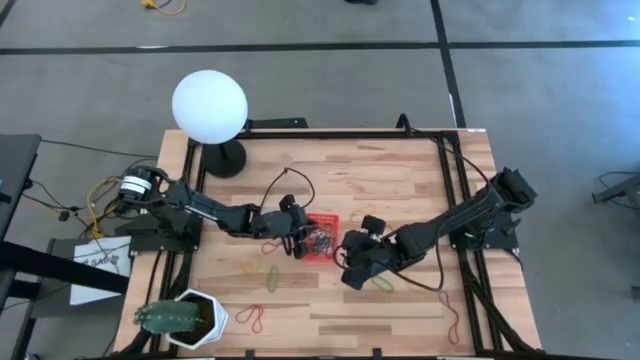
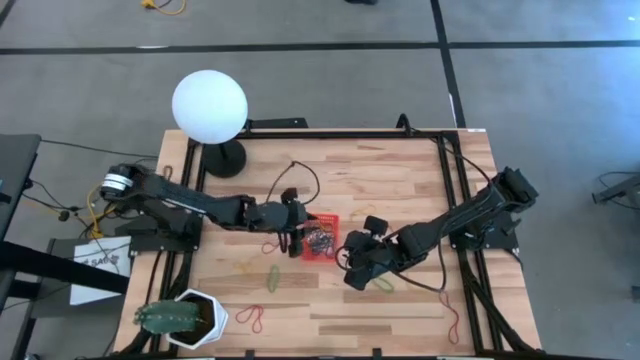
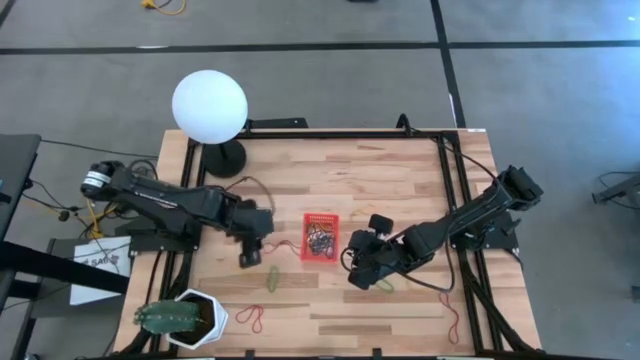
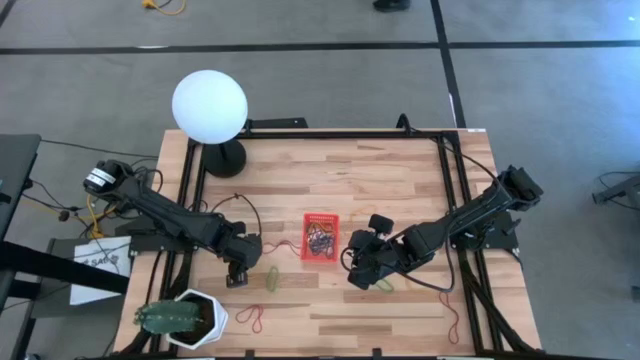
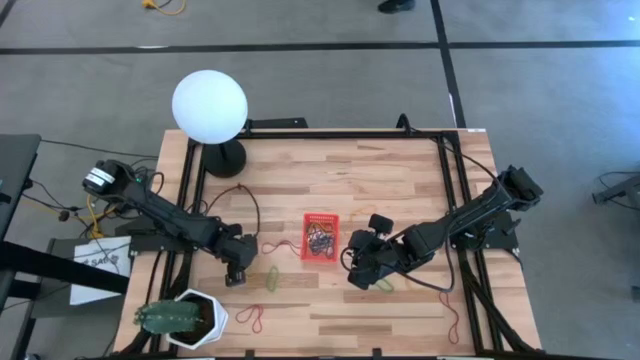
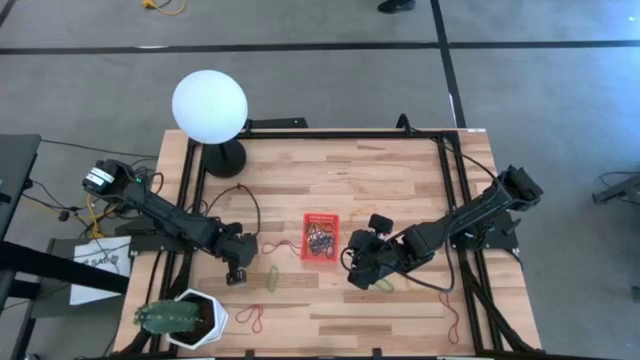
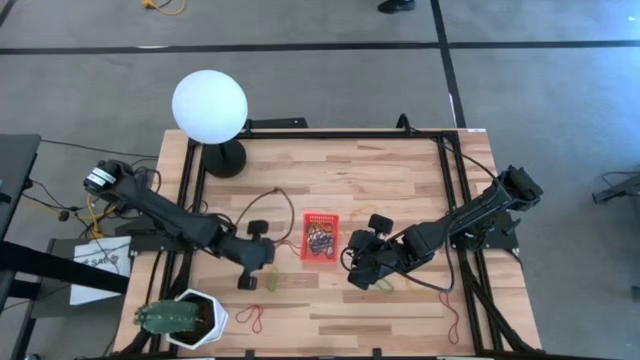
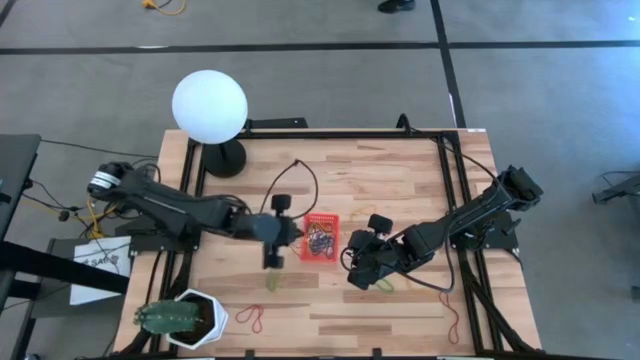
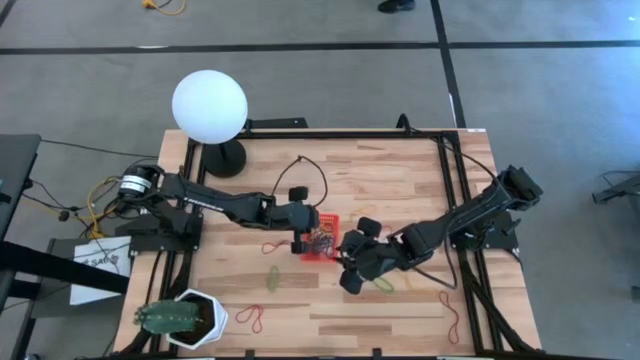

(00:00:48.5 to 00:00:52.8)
Task: Pick and place items into bin
Put the yellow rubber band into the orange bin

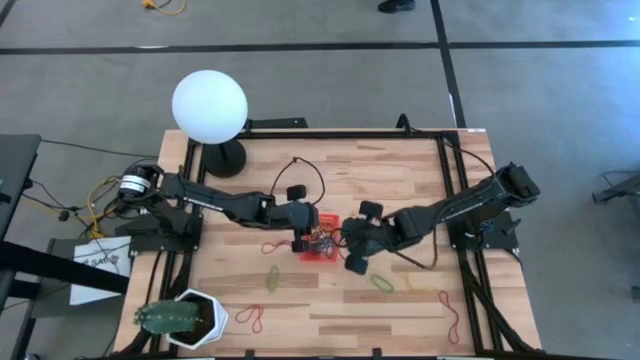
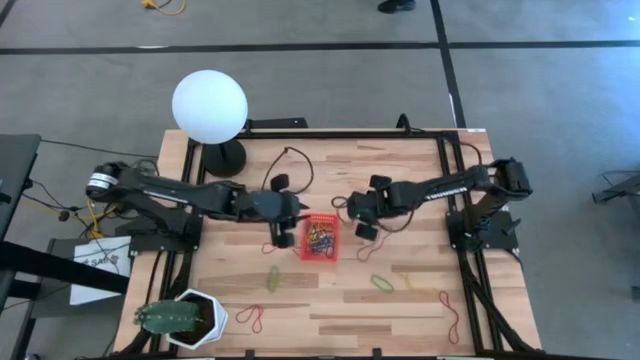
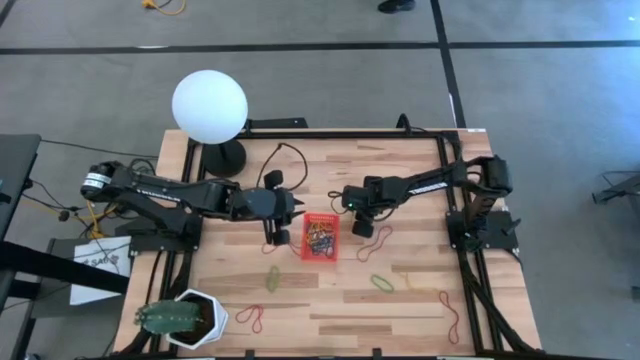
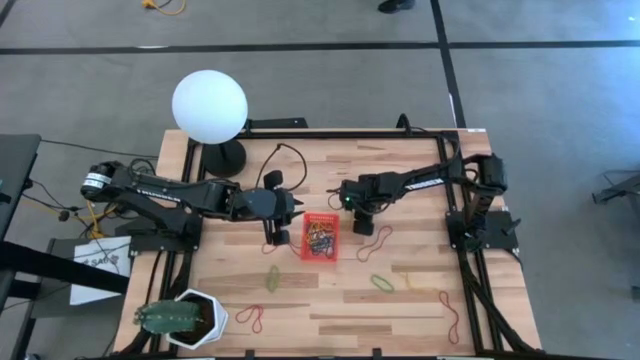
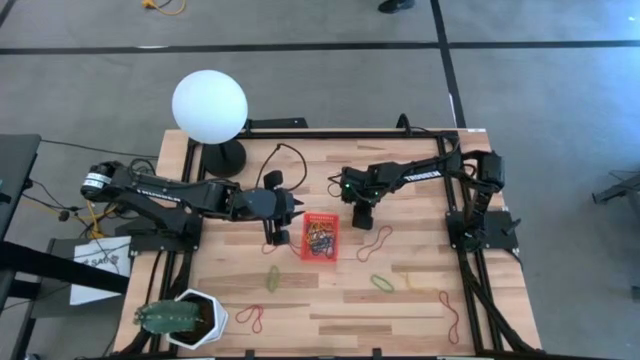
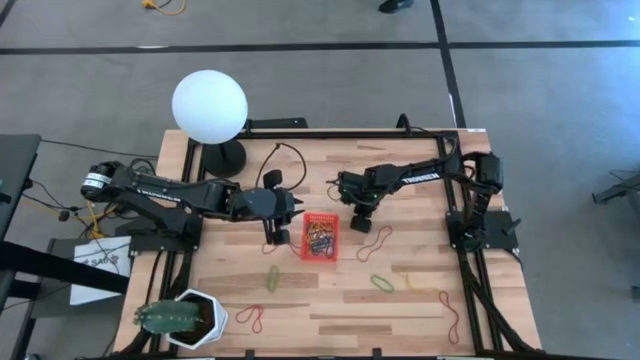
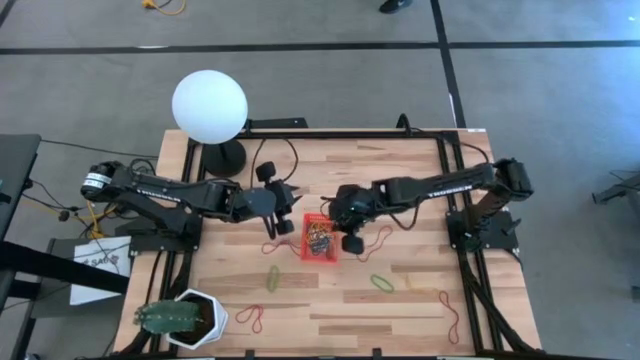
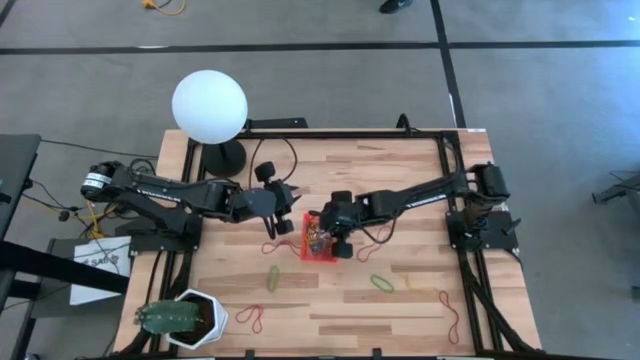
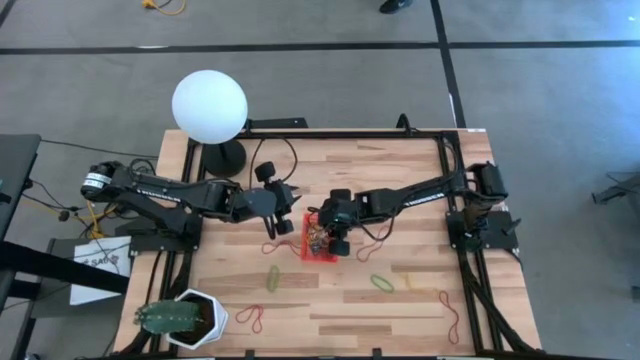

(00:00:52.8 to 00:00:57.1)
Put the yellow rubber band into the orange bin

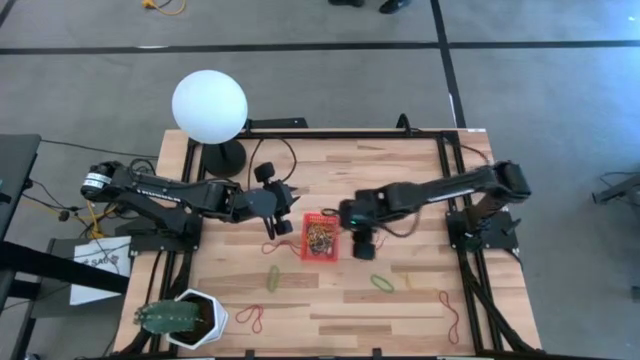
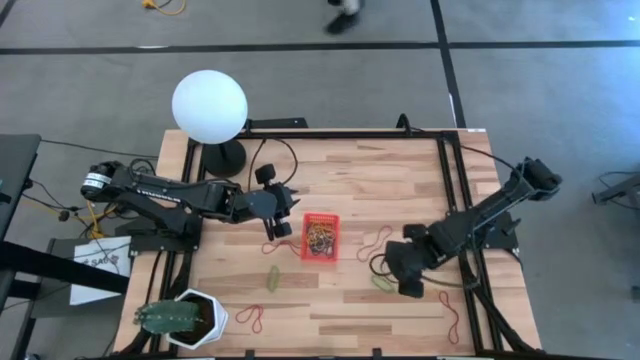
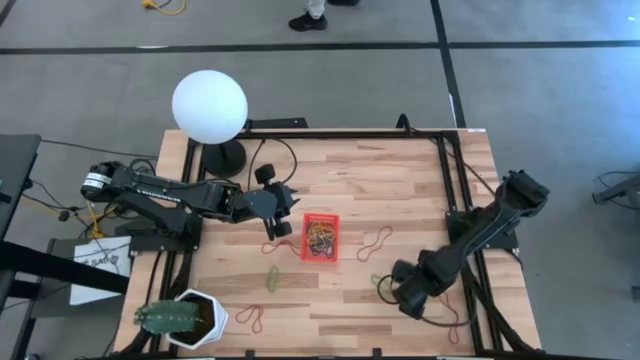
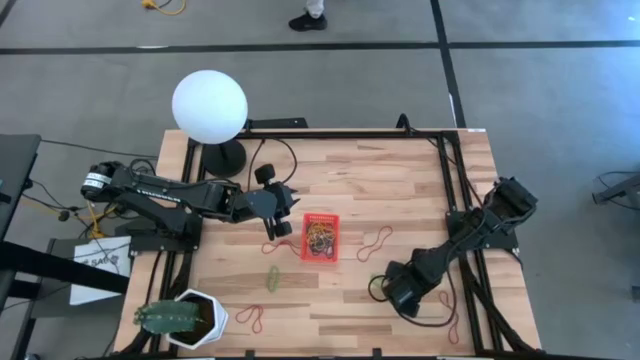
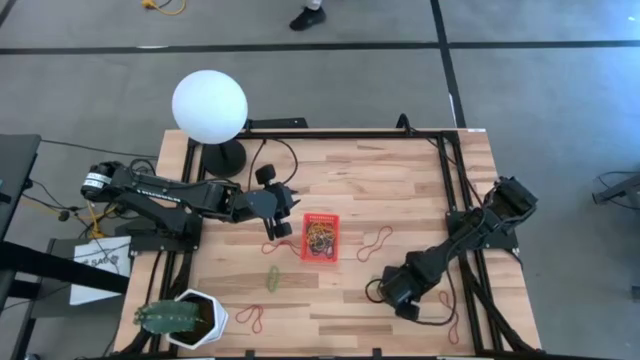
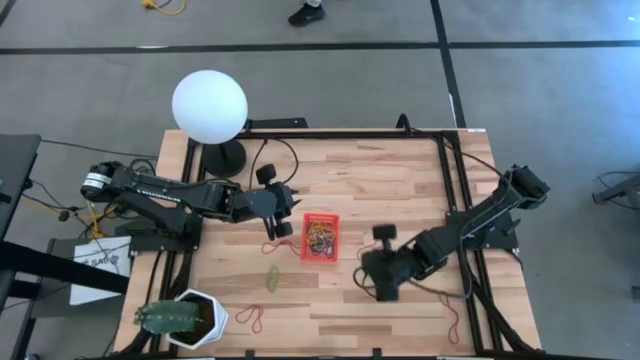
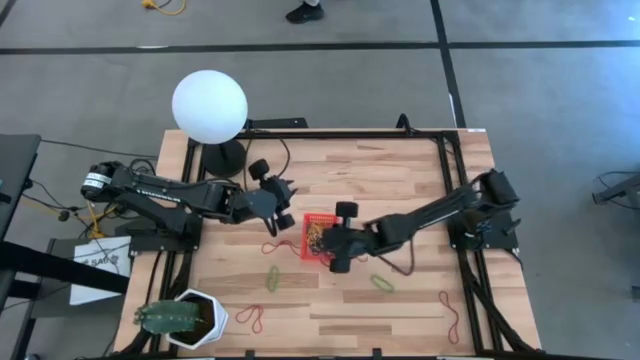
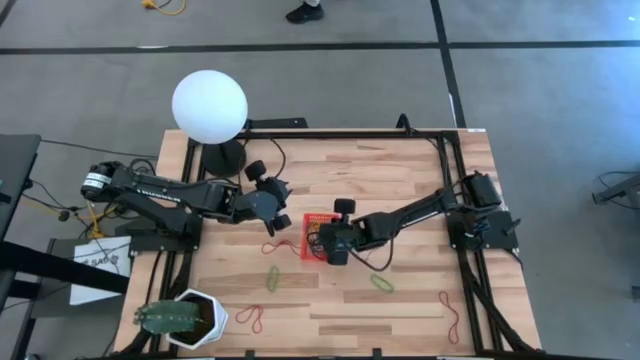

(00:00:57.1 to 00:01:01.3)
Put the yellow rubber band into the orange bin

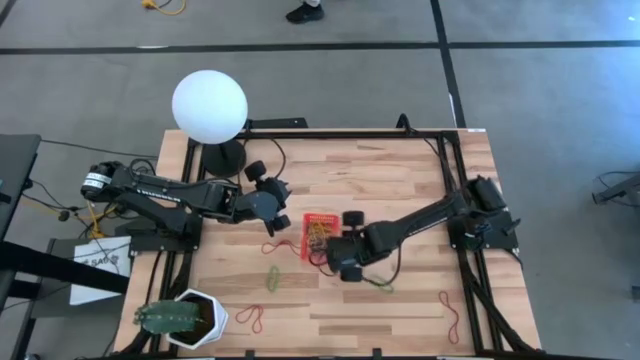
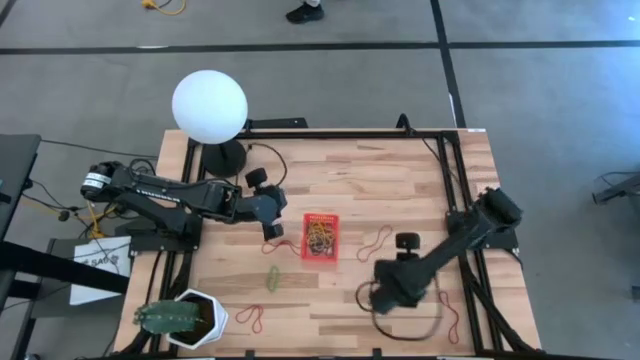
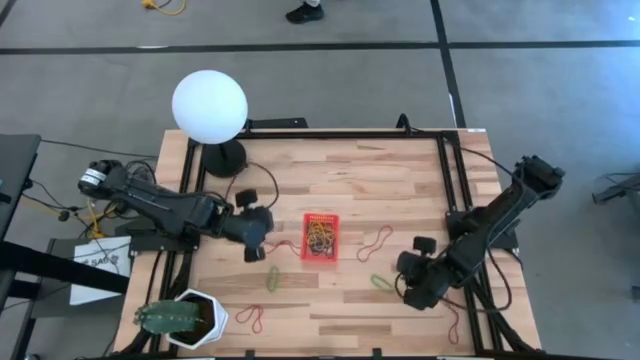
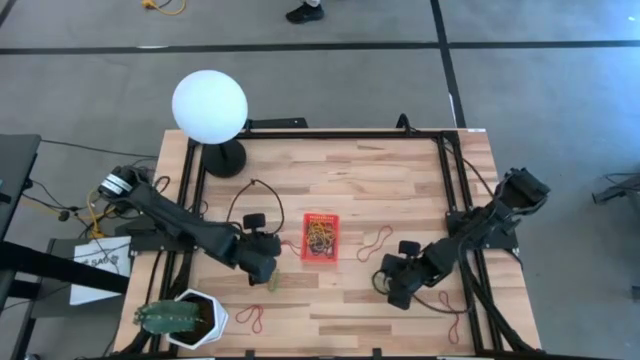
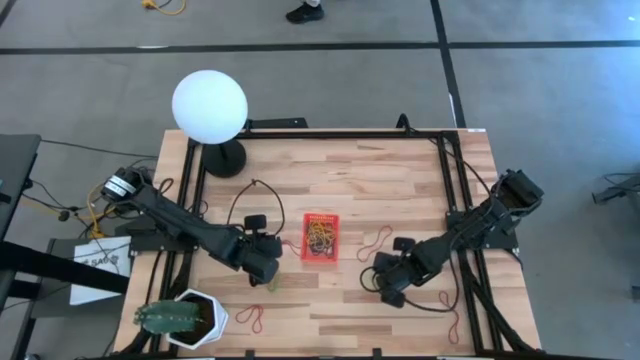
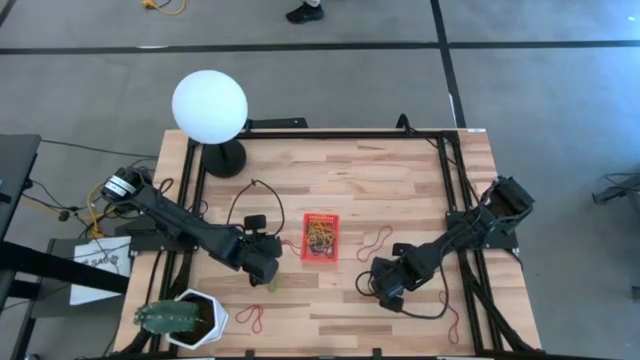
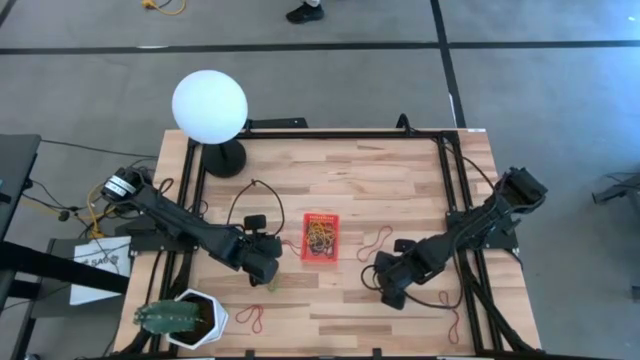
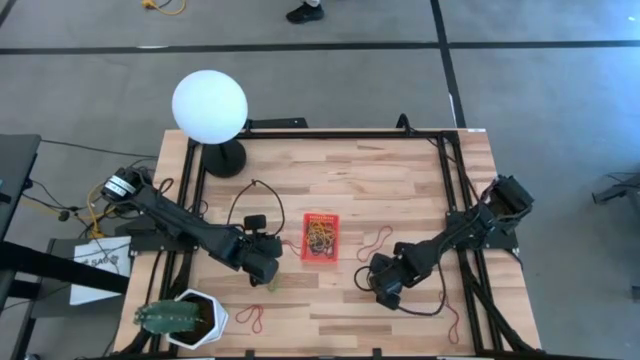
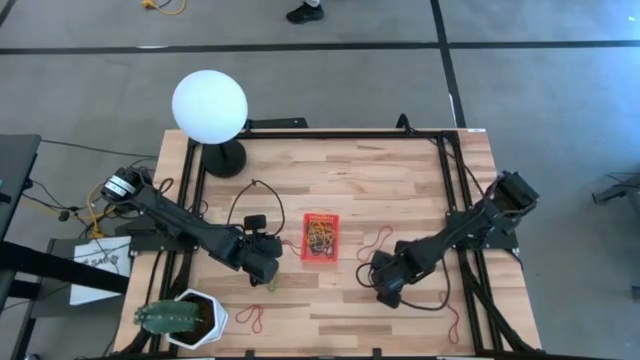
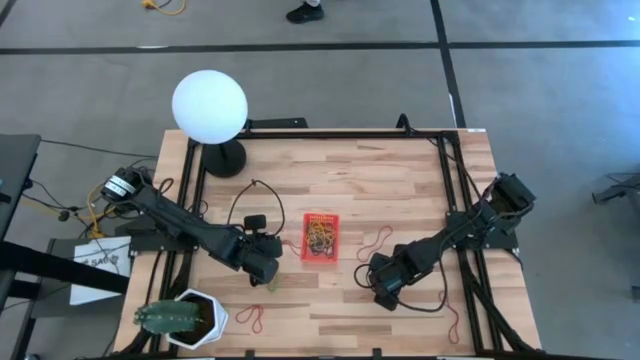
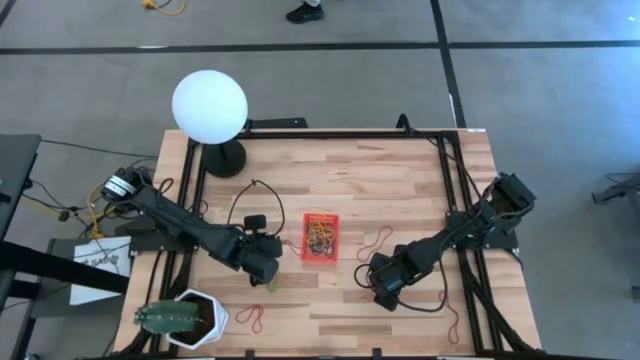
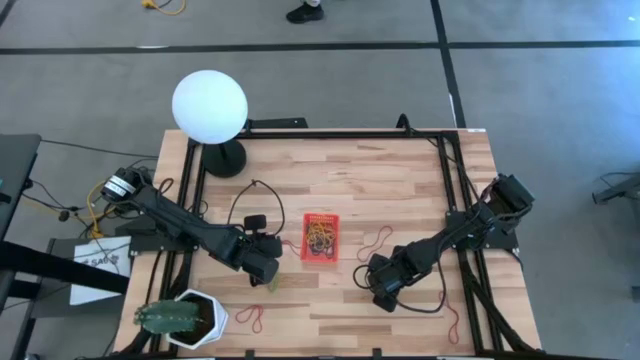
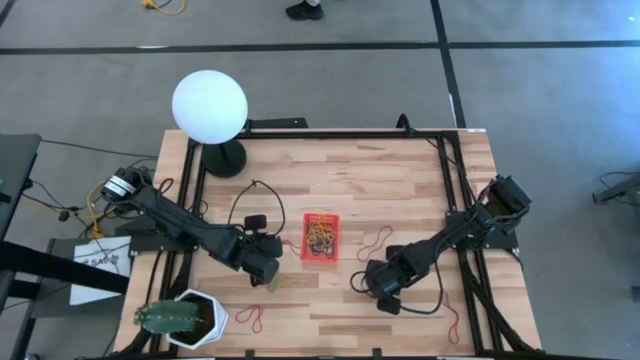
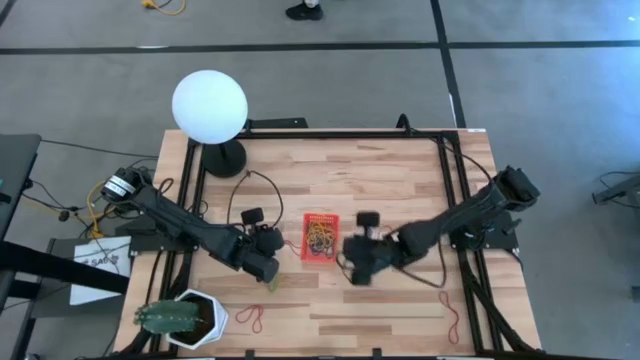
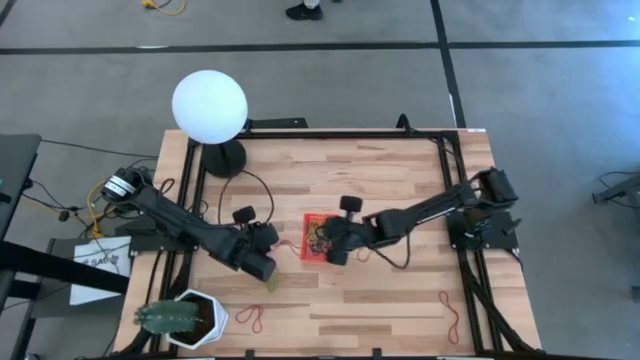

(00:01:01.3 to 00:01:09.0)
Put the right green rubber band into the orange bin

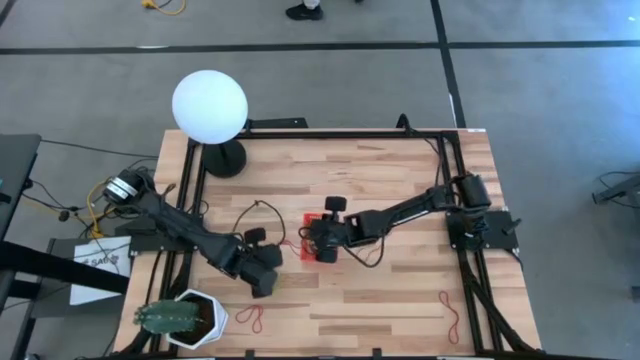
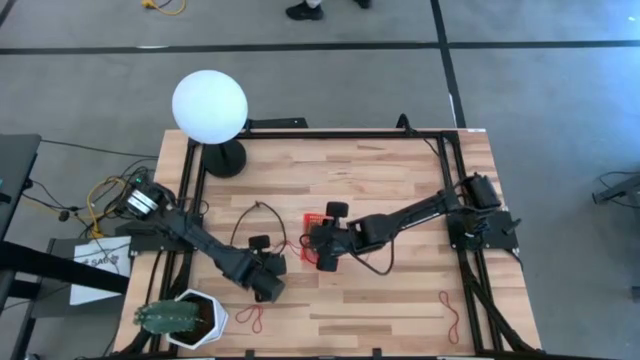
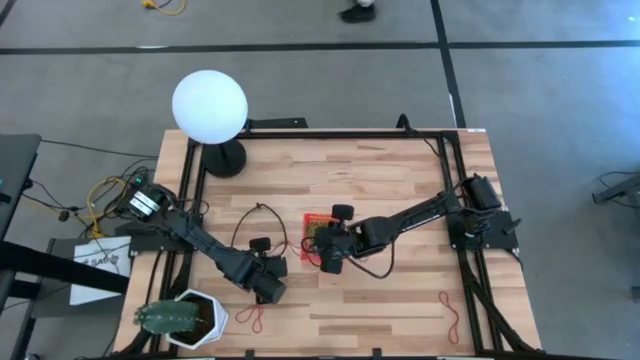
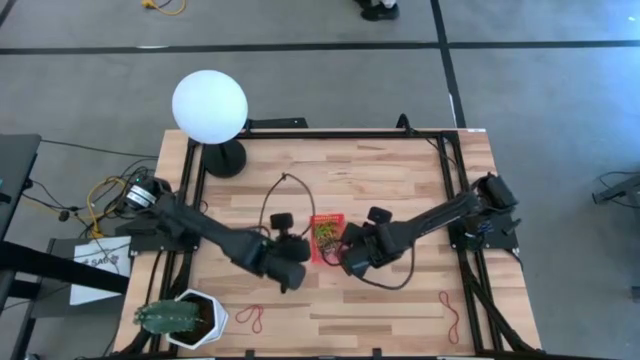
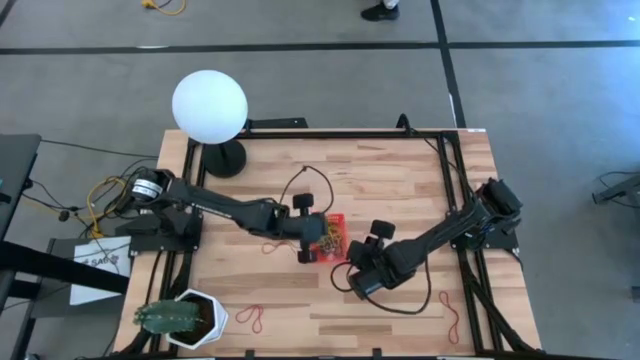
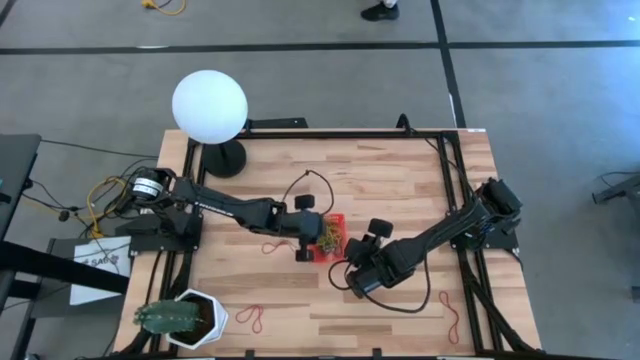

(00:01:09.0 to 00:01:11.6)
Put the green rubber band into the orange bin
